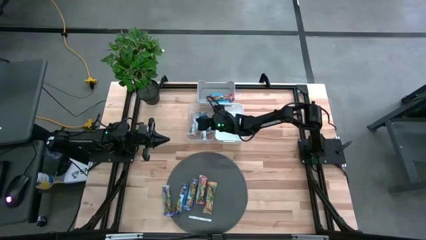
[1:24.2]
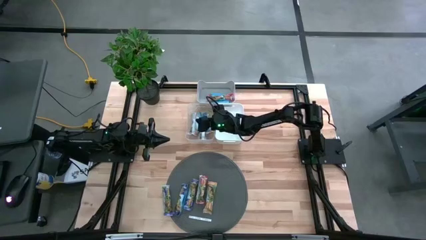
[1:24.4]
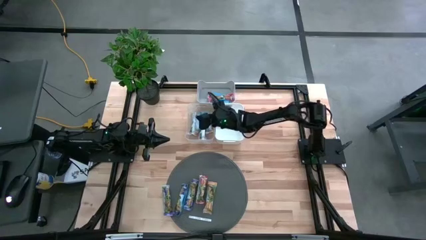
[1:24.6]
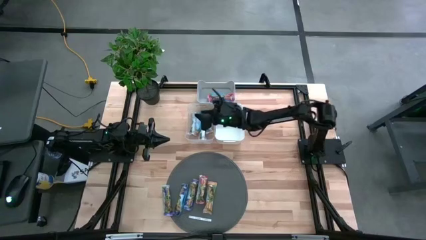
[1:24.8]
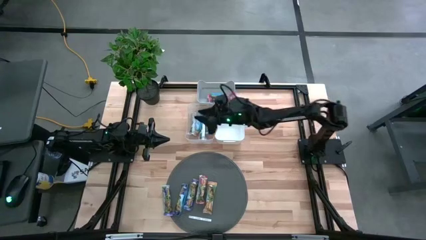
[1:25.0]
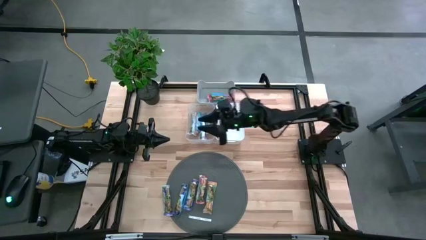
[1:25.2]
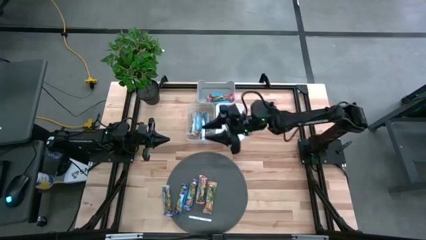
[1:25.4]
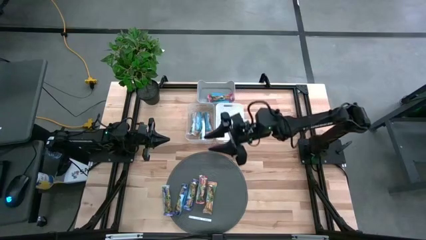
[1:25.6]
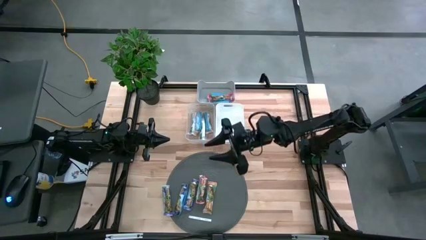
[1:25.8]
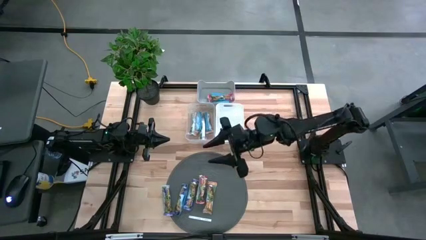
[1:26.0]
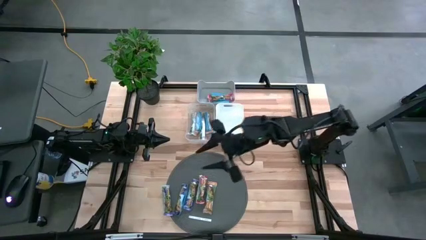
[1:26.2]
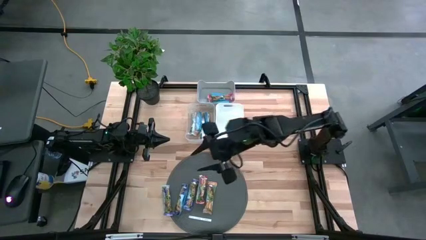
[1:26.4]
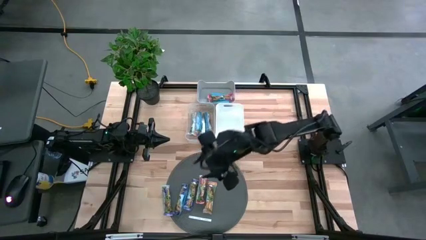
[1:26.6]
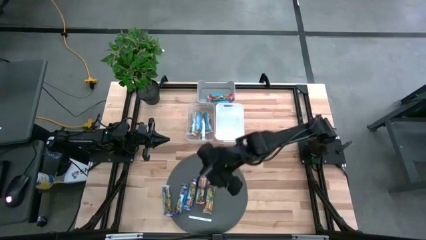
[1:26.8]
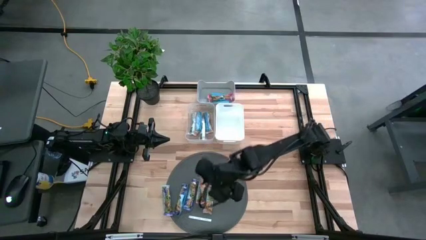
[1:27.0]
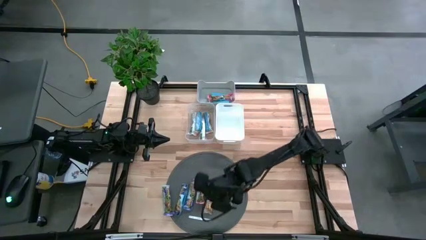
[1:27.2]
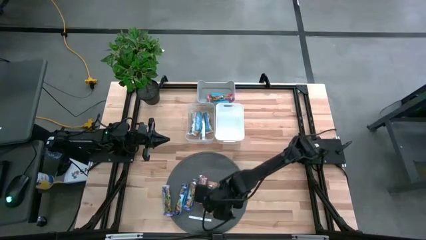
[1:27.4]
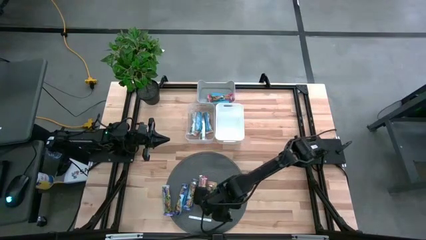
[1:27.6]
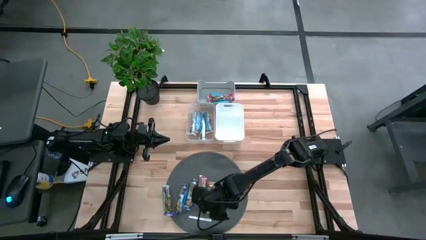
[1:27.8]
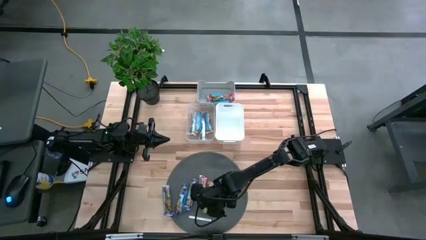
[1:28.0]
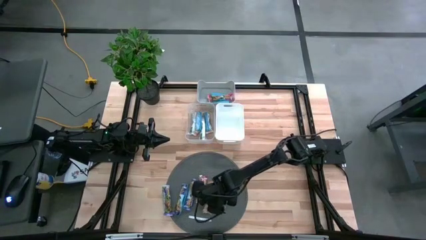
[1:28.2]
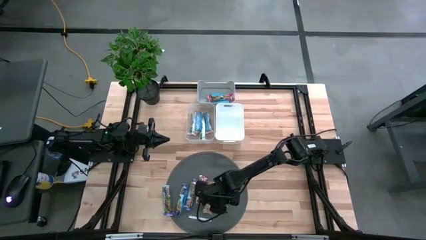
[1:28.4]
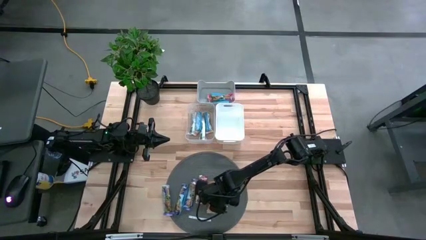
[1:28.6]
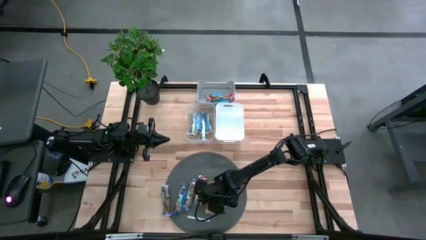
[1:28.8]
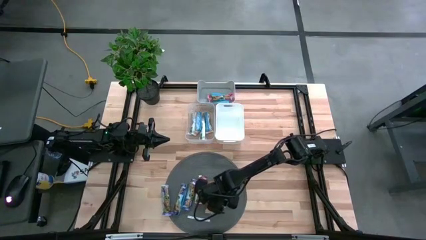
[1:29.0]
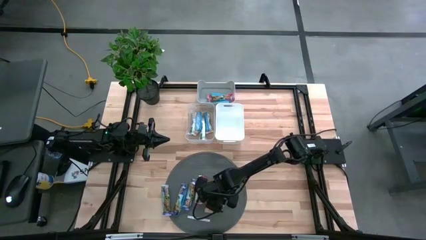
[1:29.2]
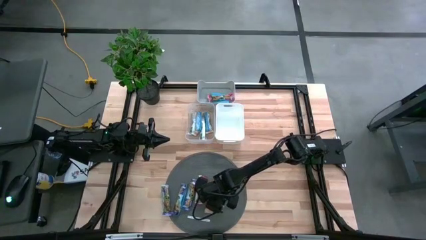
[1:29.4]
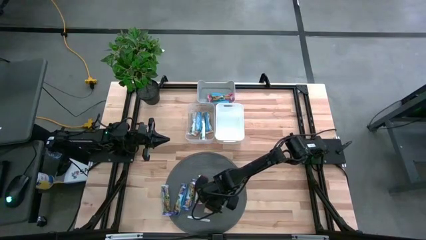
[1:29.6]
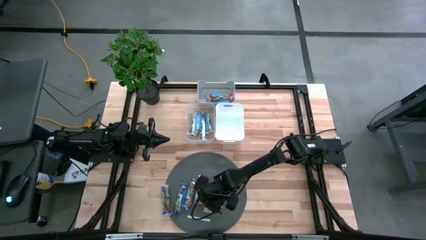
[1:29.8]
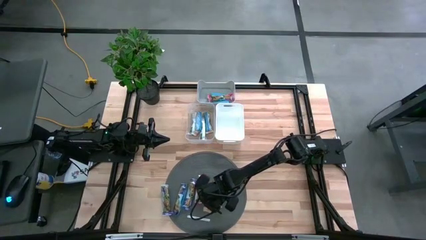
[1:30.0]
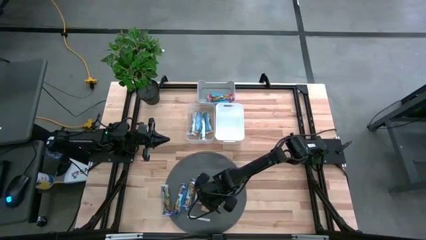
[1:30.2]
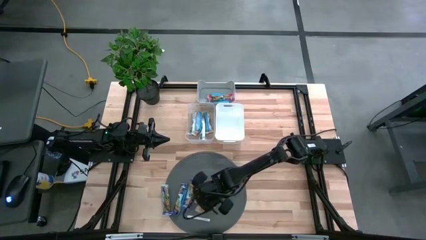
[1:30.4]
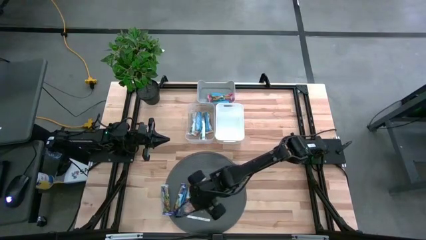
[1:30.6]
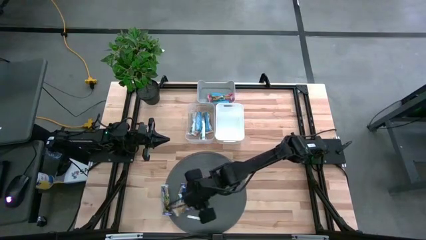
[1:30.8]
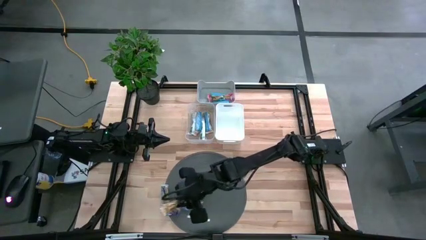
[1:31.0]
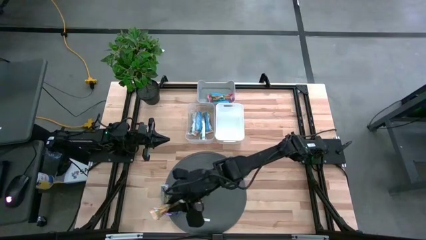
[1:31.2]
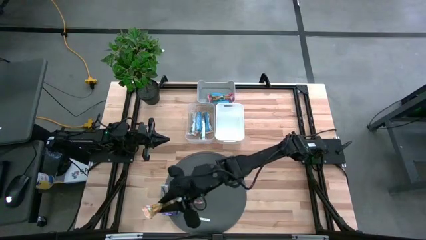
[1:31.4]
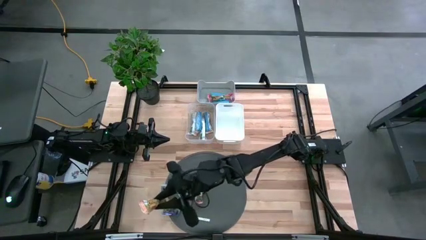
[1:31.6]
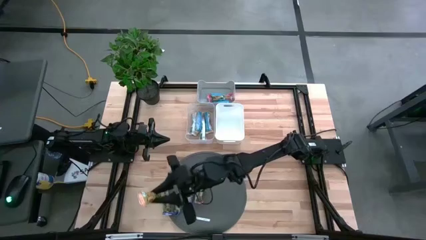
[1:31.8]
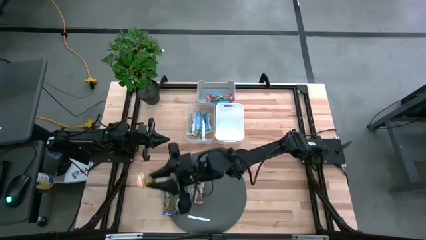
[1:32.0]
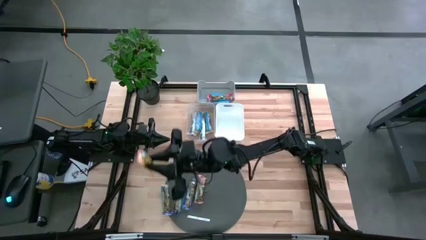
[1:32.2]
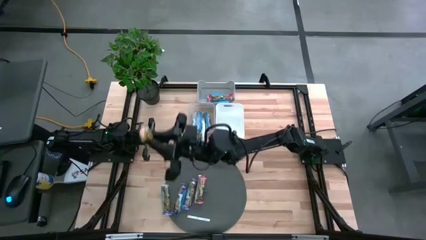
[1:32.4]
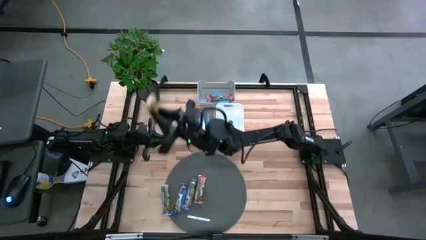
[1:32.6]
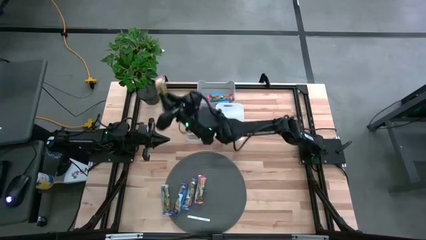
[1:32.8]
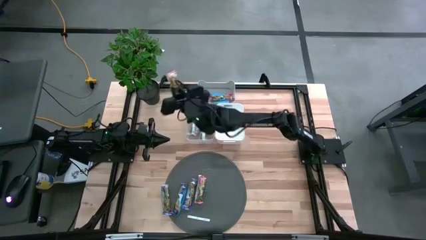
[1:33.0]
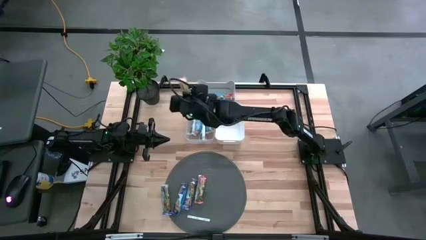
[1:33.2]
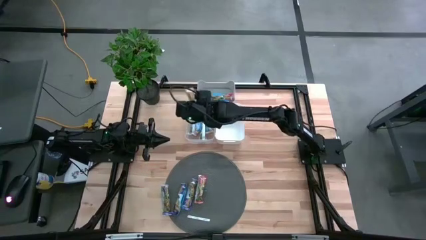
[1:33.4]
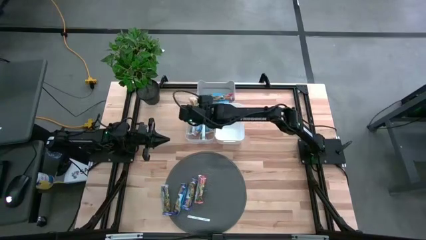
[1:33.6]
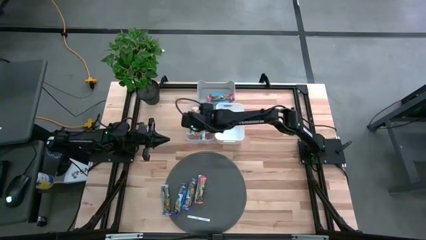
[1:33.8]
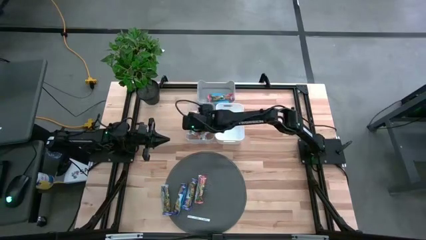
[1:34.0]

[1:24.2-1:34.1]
Task: Pick and place Granola Bars by type
Put the yellow granola bar into the transparent bin

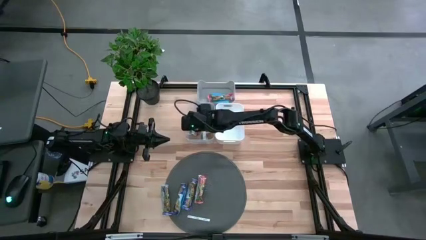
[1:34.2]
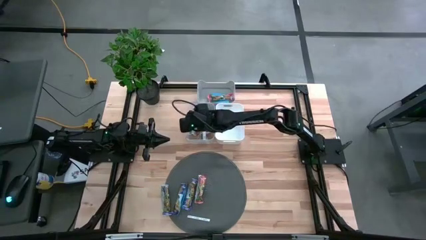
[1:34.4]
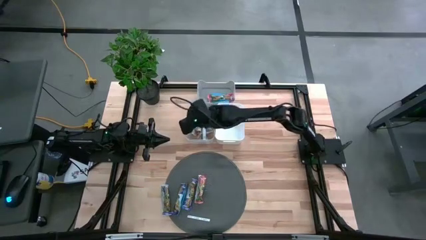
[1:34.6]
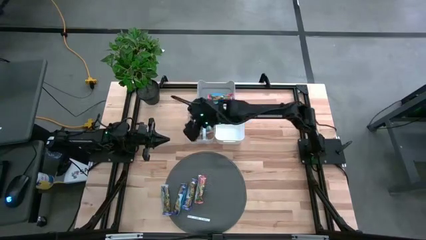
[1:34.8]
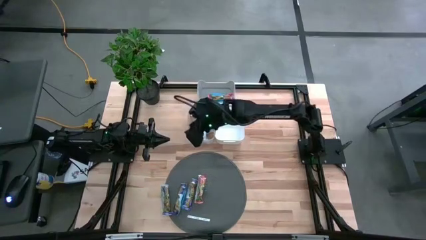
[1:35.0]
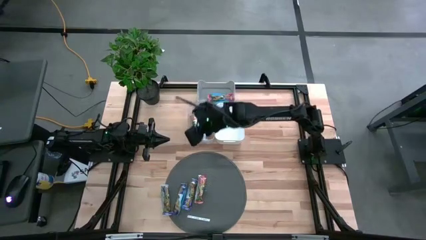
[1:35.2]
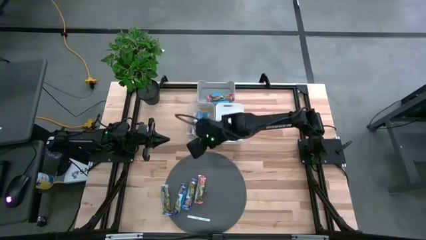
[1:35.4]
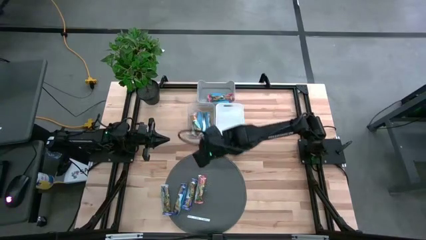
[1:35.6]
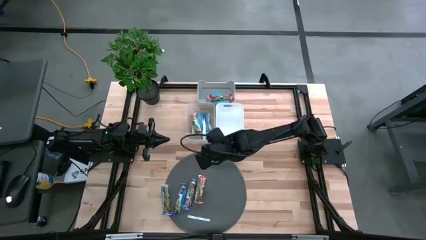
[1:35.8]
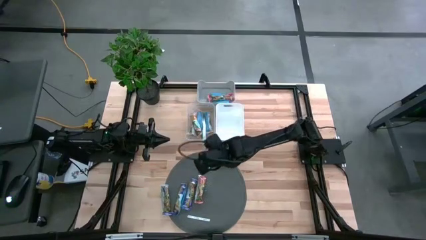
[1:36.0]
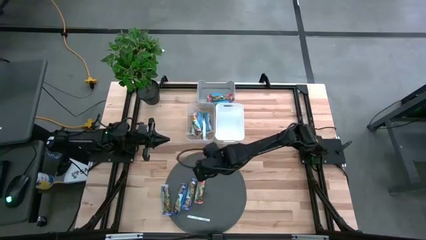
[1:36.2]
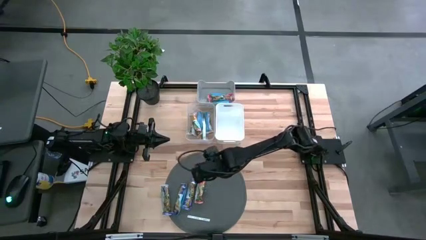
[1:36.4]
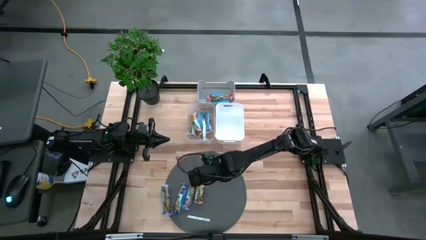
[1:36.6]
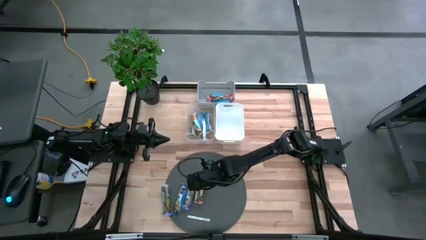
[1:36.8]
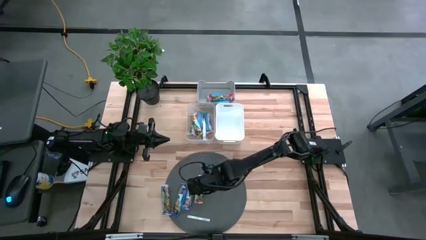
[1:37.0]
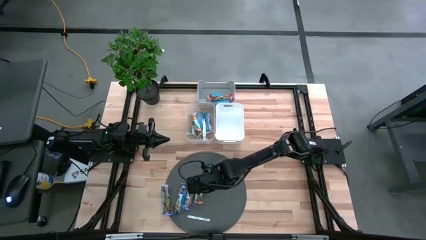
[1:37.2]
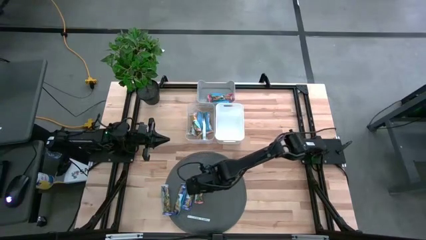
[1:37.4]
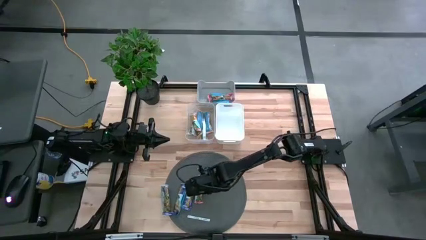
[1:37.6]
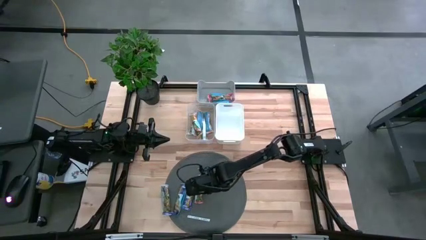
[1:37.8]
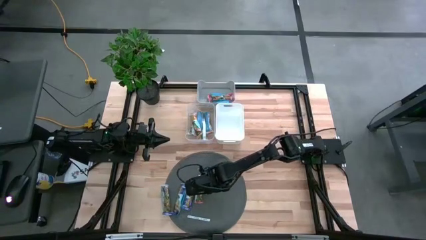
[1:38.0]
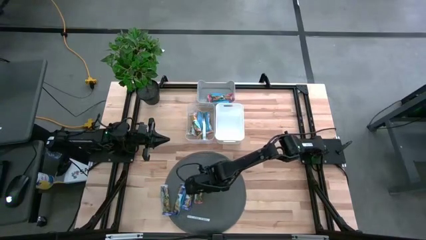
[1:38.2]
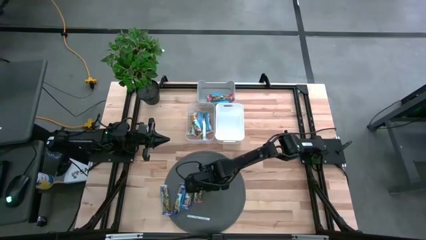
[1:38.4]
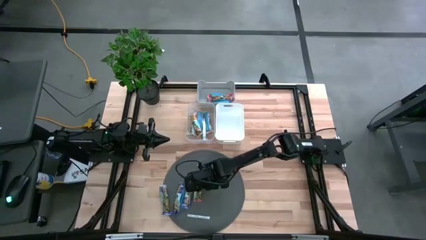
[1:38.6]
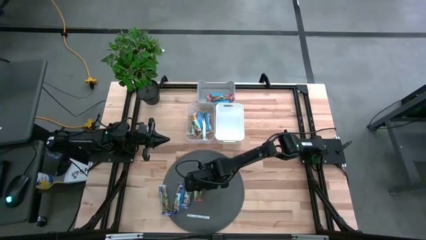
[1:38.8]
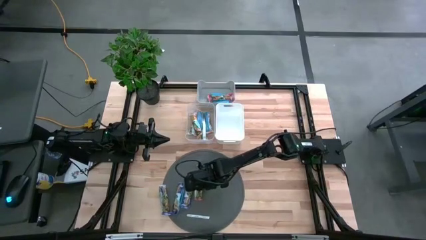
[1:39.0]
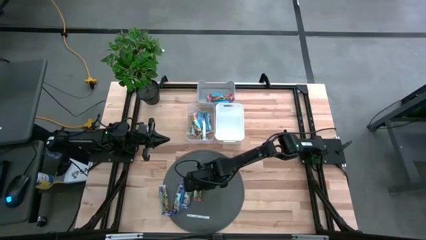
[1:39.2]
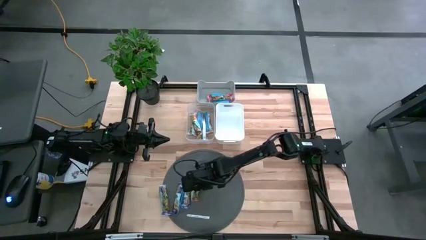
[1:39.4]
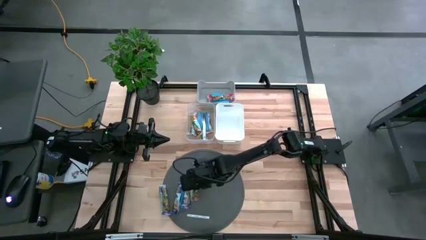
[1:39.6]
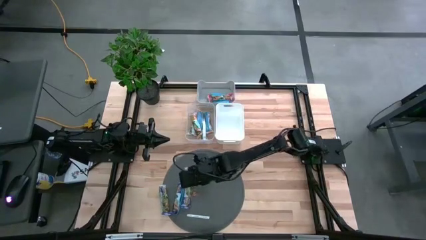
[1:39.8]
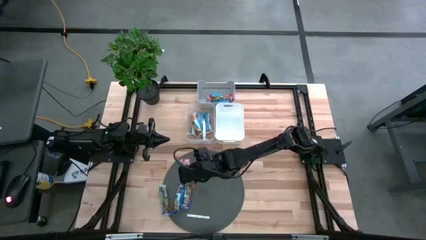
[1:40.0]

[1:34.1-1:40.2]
Put the red granola bar into the gray bin
